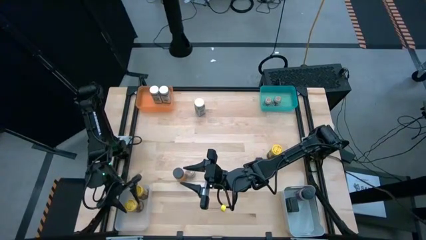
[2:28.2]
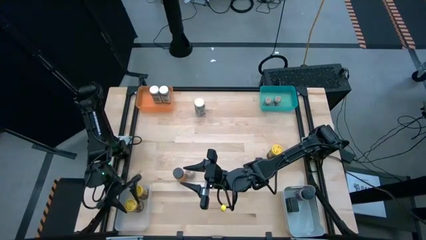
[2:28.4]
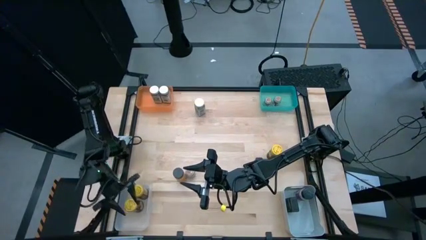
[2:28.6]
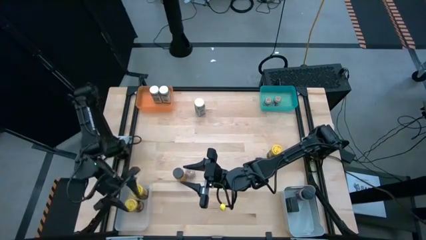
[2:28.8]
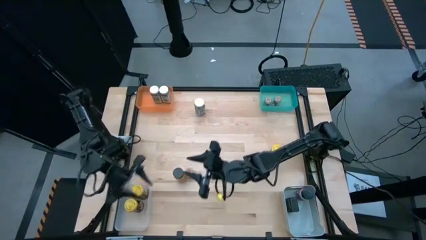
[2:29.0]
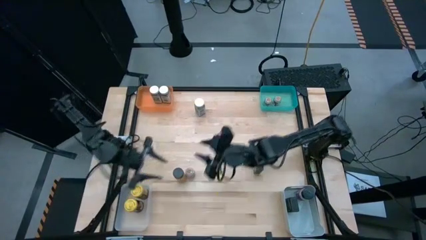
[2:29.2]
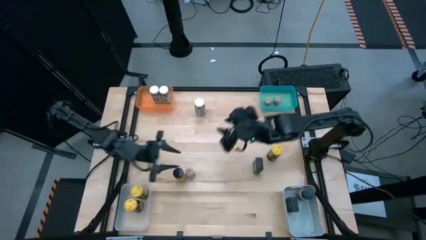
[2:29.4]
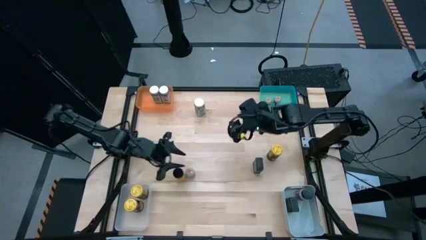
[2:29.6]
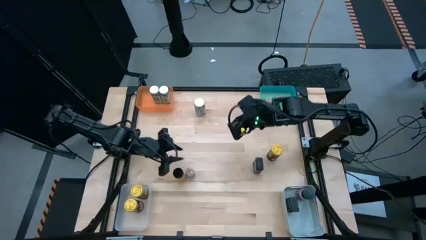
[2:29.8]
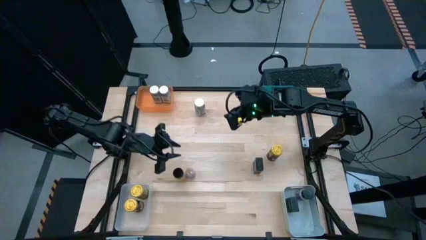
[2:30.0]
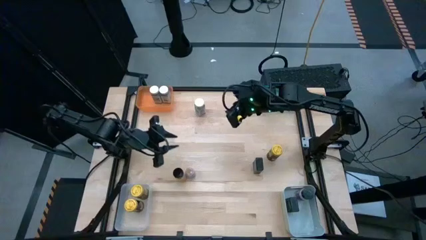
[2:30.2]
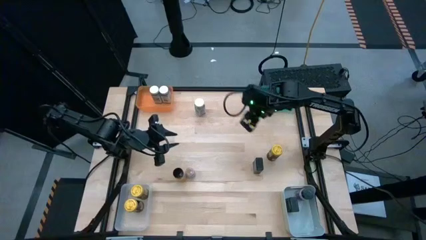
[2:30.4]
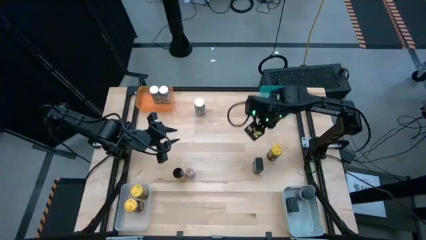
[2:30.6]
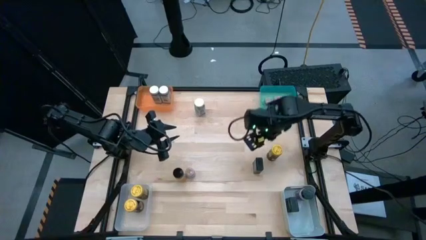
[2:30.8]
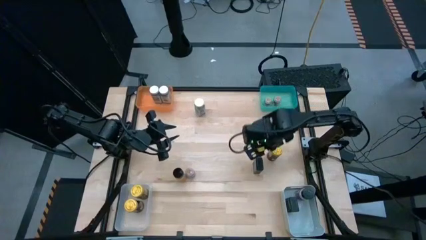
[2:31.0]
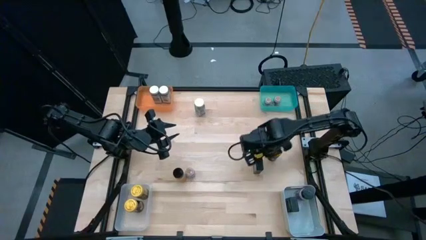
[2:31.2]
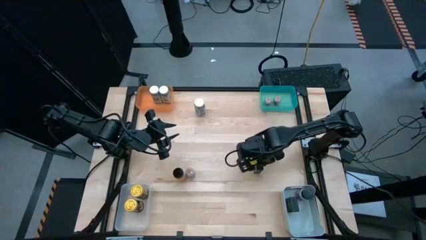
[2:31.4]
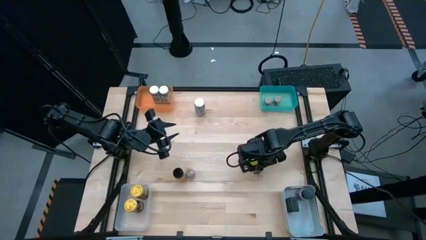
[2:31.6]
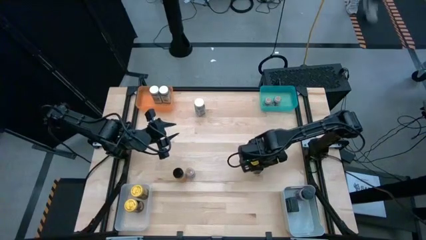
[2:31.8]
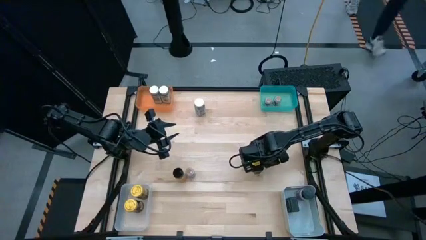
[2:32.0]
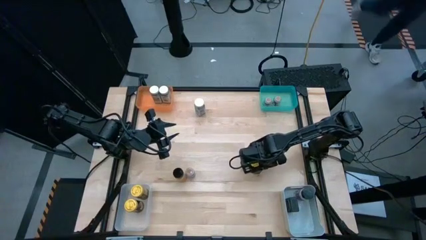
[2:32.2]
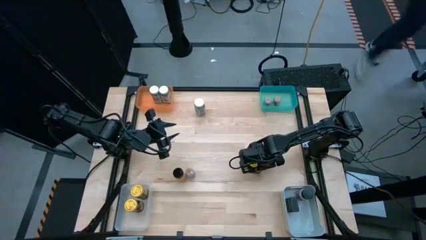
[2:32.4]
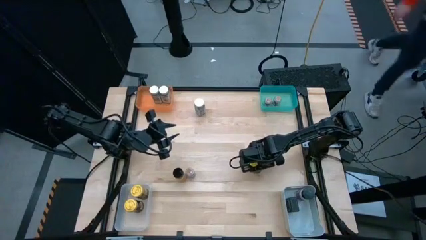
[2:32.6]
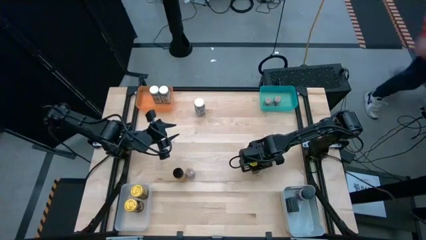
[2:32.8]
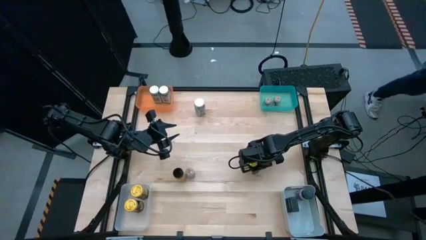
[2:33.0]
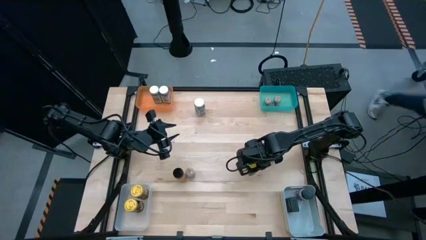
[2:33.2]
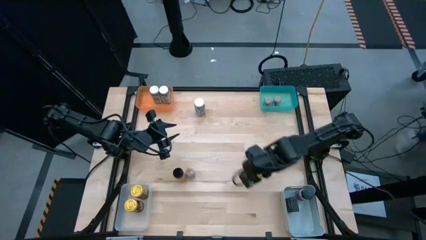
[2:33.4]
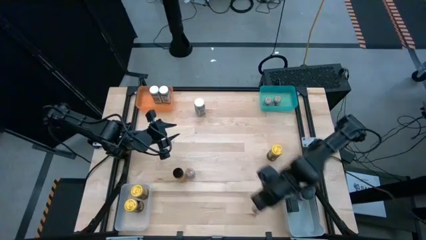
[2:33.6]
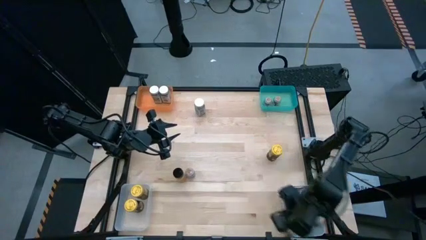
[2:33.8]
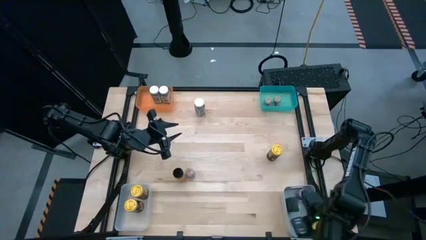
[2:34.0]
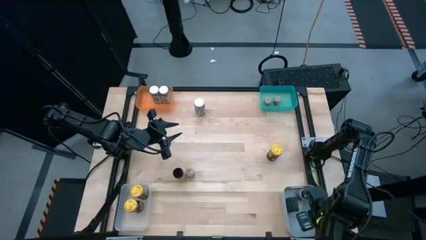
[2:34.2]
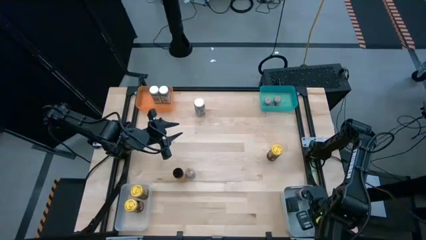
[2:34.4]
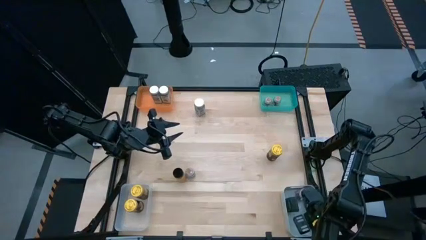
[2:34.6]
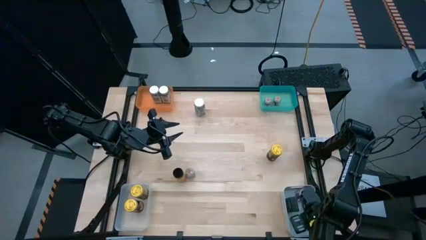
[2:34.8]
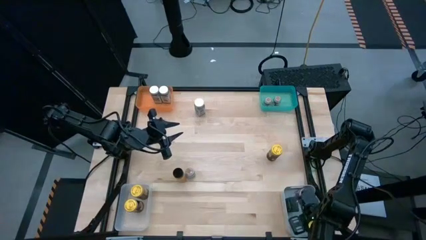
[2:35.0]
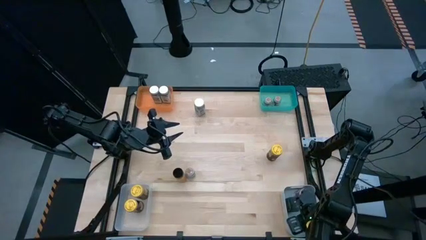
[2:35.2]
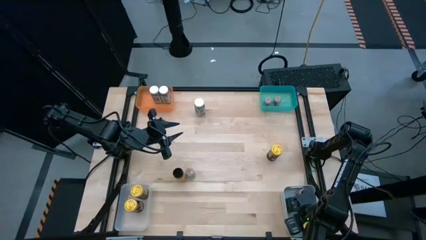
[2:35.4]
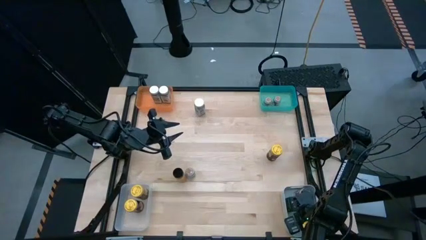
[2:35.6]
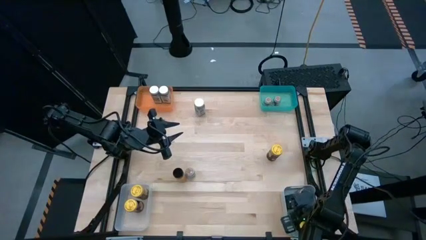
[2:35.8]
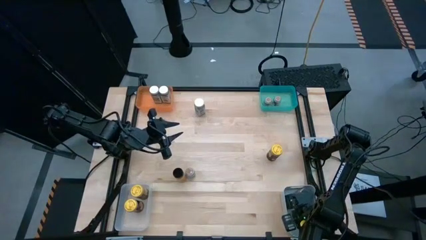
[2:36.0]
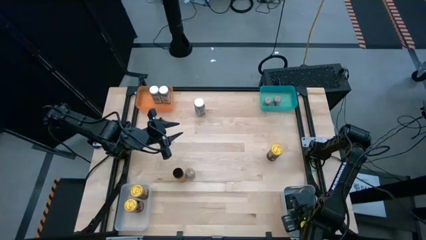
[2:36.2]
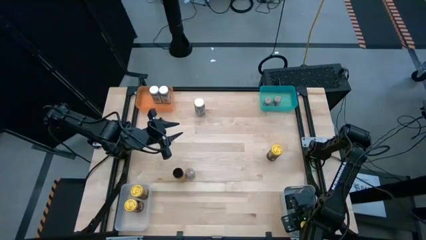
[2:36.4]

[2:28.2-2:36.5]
Task: Sort spices by type
Put the black seasoning can into the gray bin

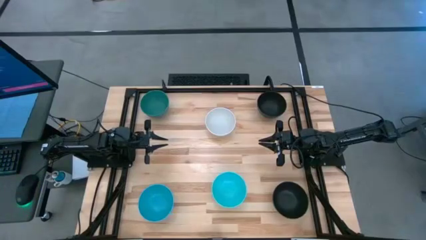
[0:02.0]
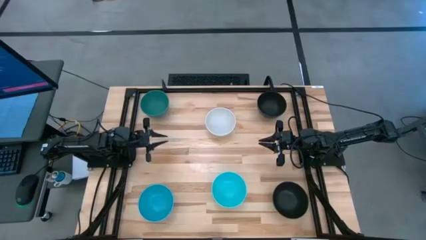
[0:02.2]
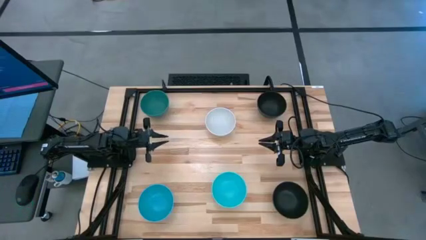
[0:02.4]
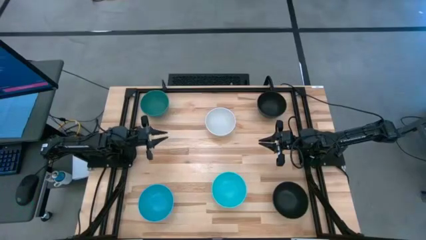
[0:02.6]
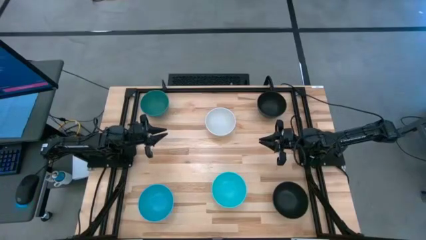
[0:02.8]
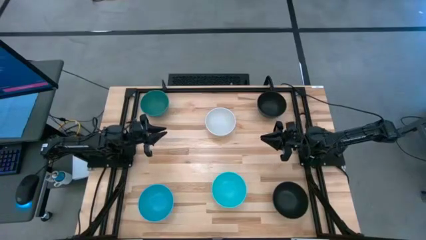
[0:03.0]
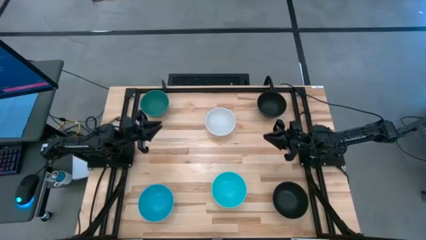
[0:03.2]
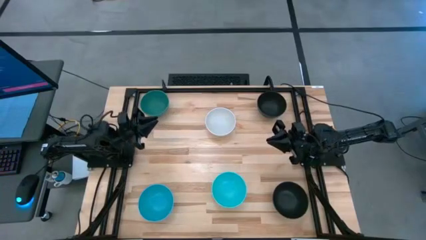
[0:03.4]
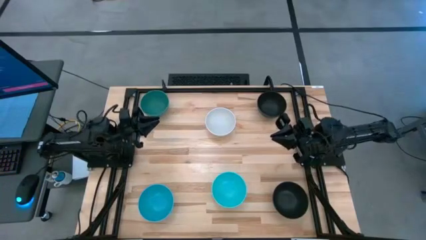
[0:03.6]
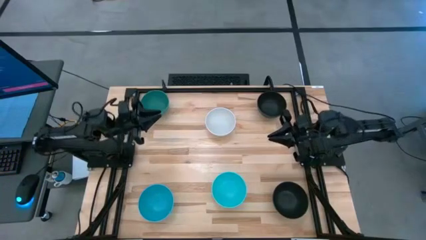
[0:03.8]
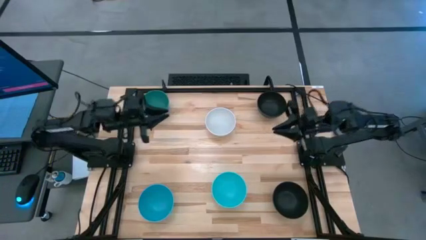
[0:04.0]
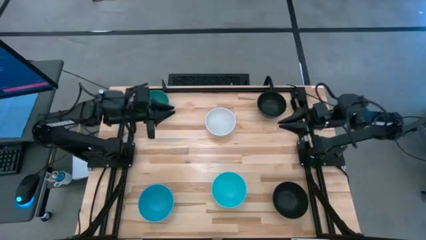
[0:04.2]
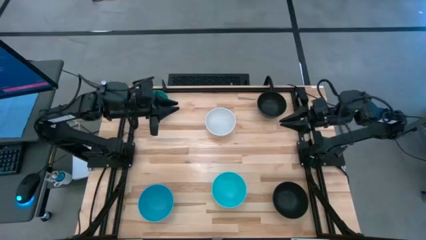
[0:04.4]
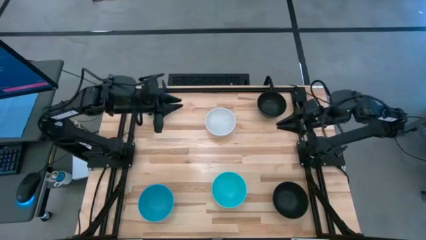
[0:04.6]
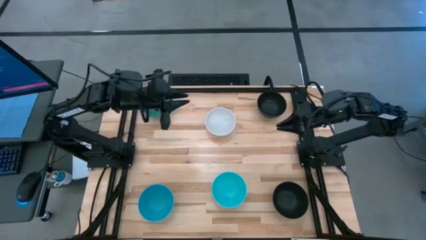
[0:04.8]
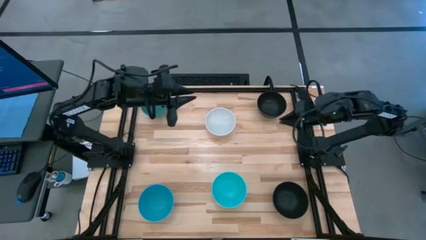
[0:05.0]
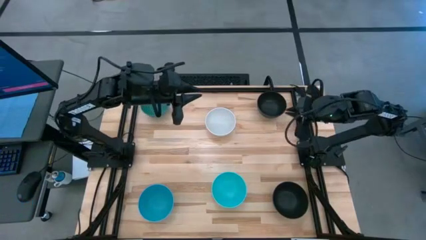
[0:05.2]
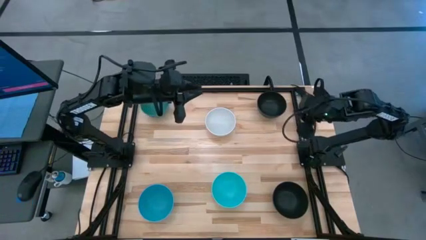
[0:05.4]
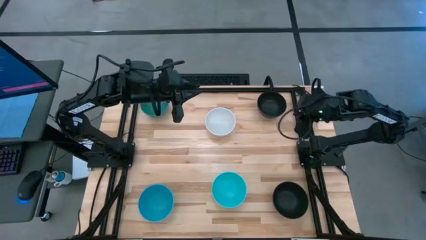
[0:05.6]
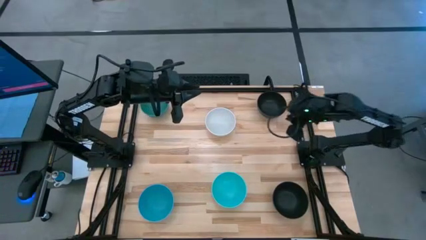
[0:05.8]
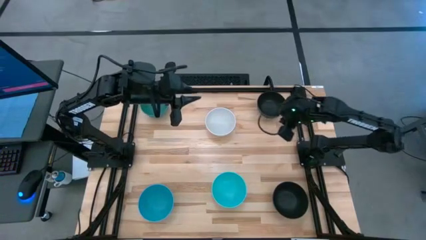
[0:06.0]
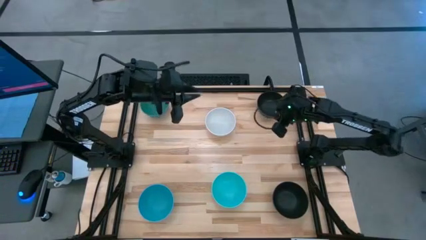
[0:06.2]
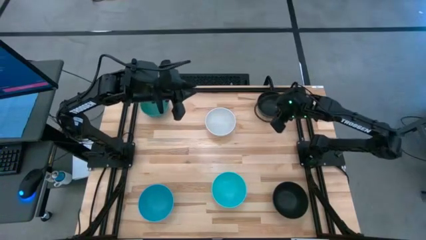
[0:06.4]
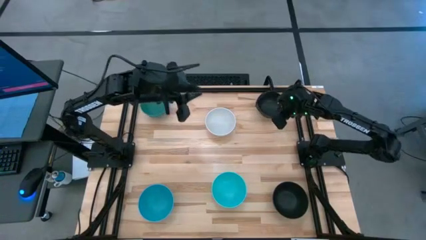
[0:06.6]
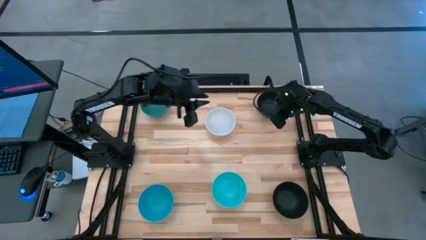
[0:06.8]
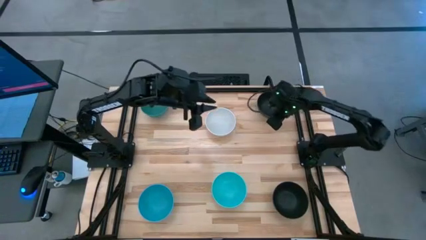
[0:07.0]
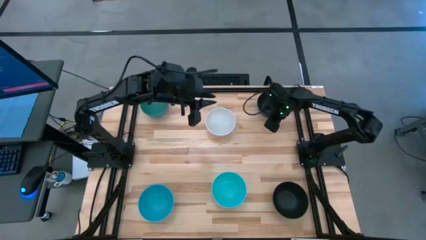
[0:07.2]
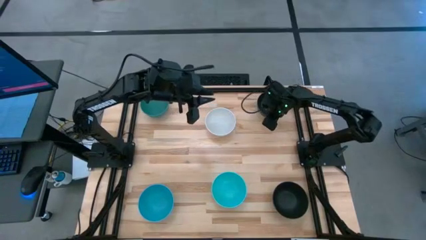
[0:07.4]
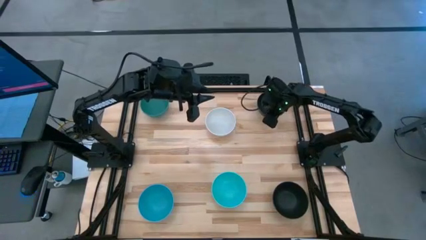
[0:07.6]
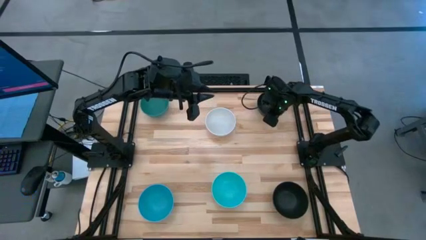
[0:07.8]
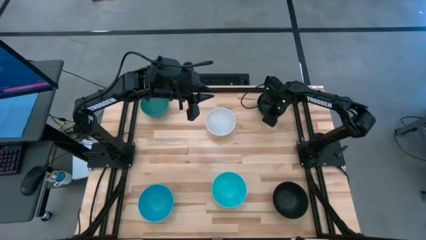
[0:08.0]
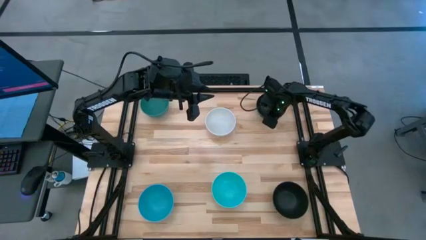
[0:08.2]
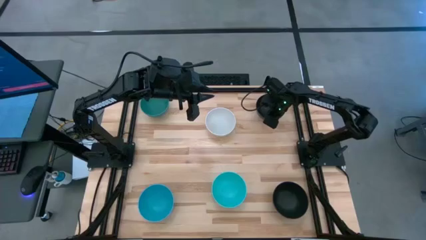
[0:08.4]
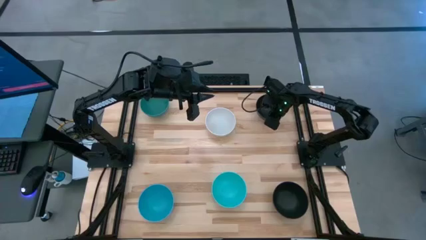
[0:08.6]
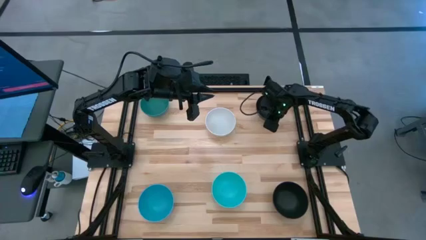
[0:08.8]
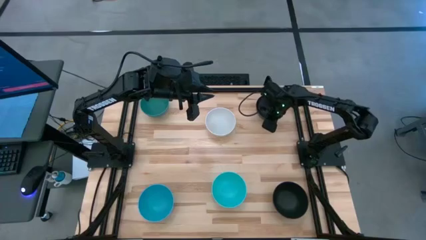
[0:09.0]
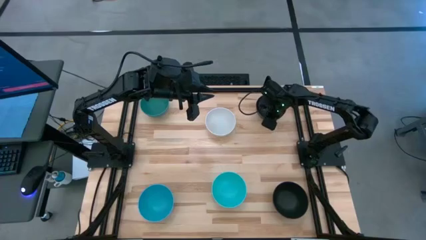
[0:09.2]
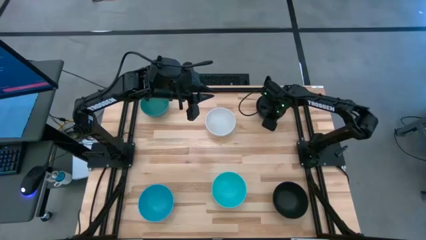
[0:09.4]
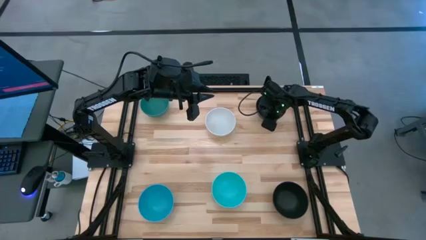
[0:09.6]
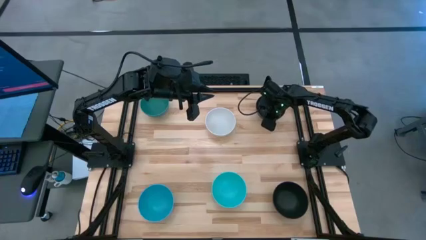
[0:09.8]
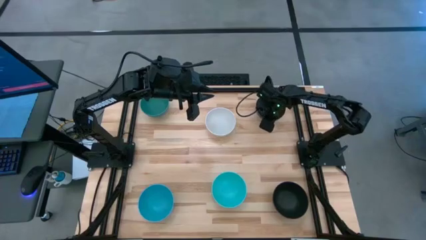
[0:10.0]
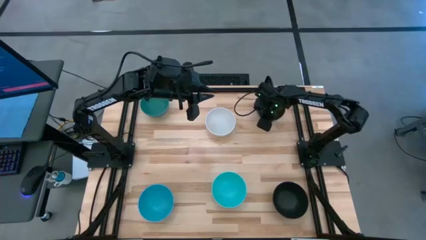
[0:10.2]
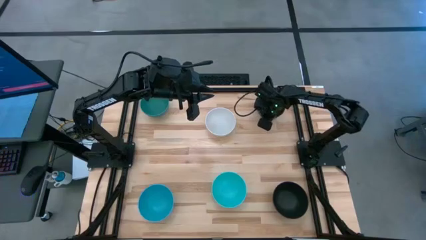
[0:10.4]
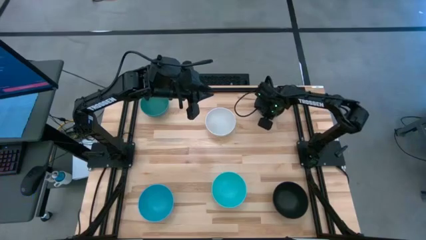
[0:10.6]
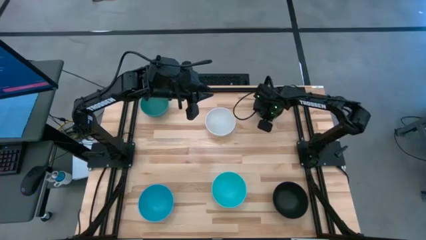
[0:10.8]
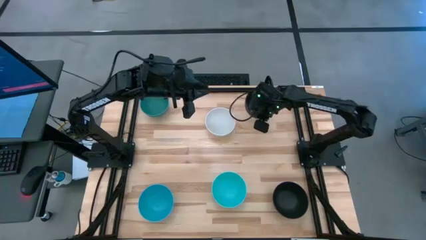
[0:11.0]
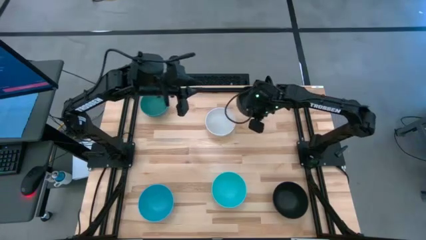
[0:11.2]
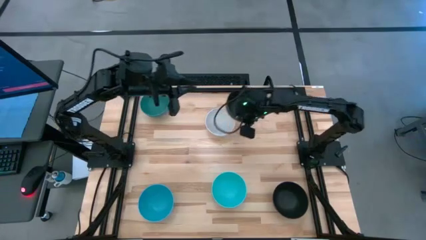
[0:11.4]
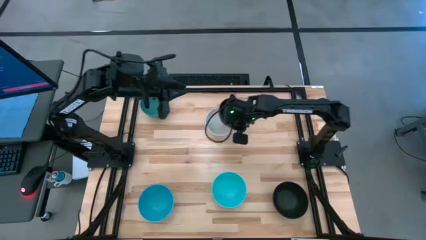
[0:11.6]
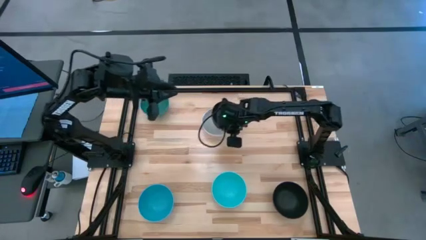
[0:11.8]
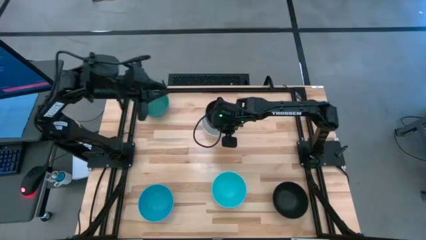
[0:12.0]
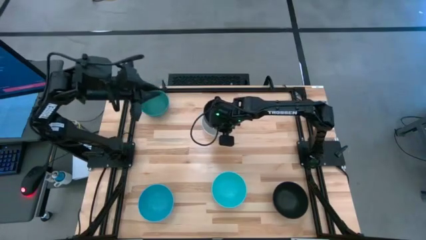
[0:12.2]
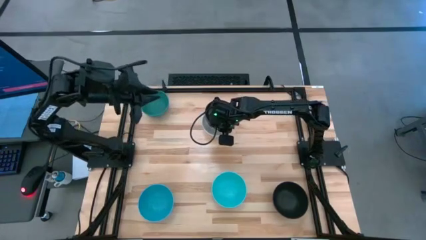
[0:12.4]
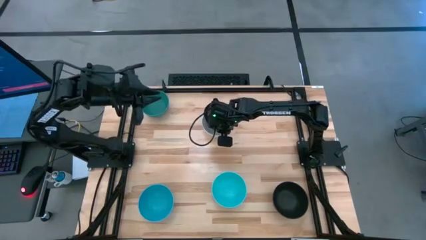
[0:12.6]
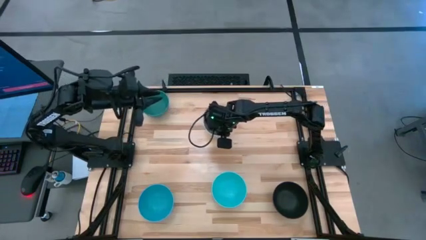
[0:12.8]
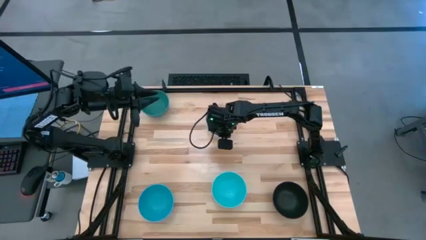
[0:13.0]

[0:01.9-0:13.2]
Task: Nest bowls inside each other
Stack the top black bowl on the white bowl
